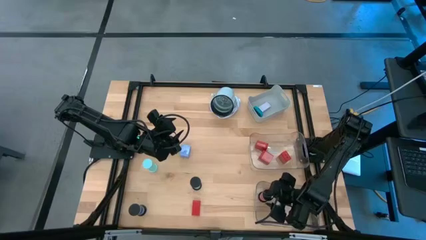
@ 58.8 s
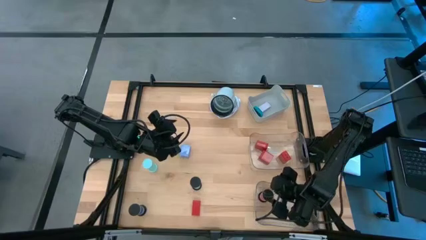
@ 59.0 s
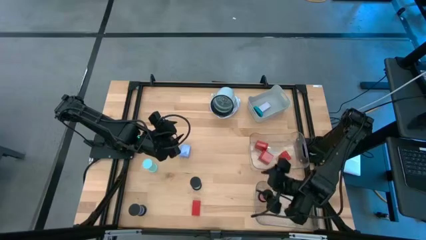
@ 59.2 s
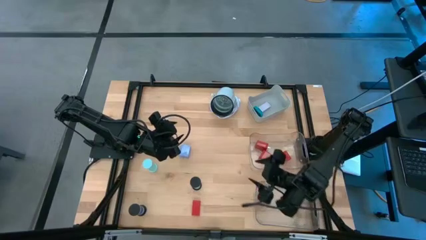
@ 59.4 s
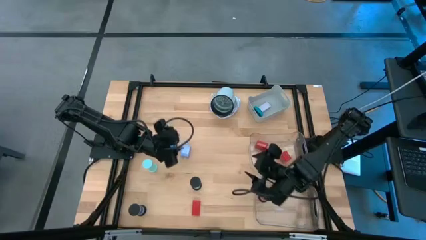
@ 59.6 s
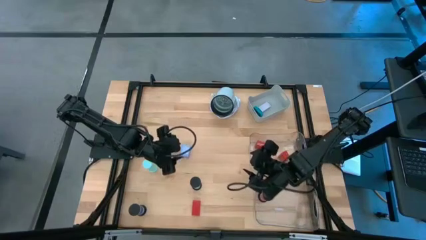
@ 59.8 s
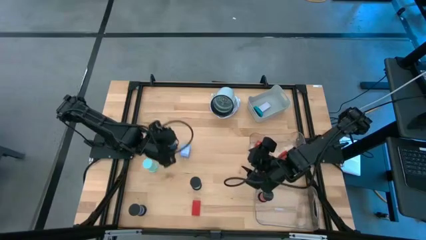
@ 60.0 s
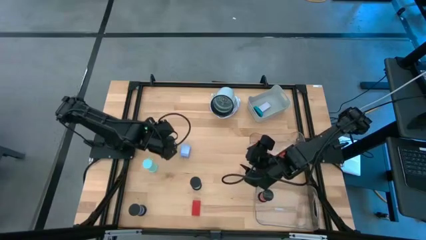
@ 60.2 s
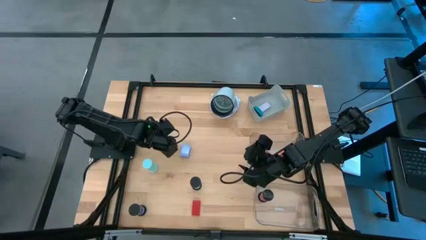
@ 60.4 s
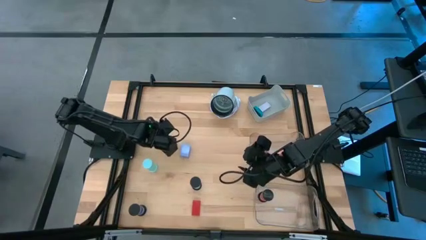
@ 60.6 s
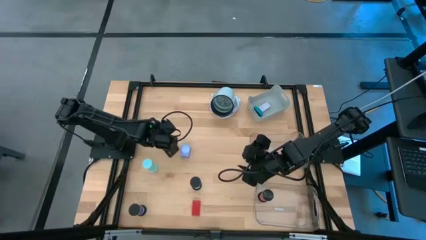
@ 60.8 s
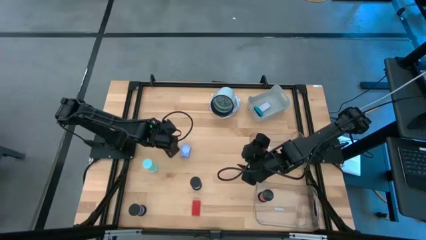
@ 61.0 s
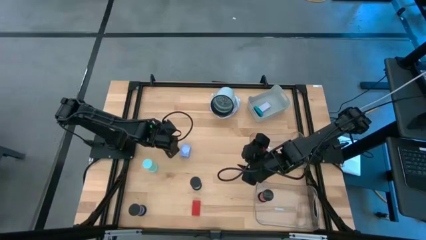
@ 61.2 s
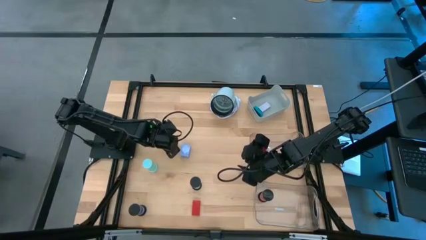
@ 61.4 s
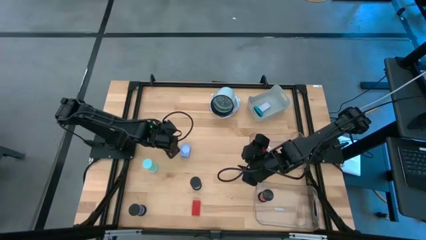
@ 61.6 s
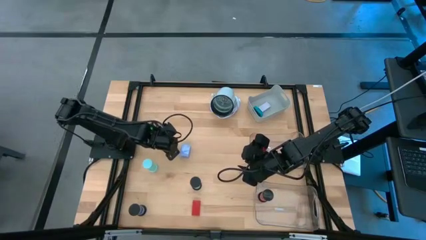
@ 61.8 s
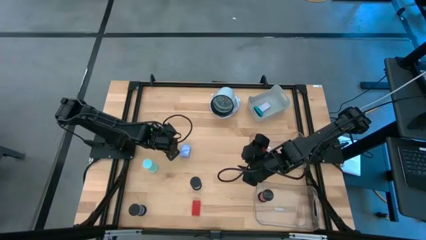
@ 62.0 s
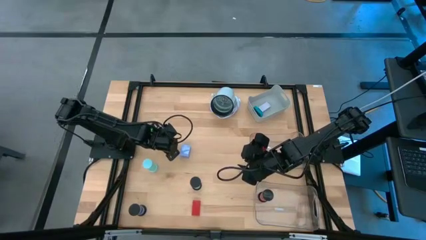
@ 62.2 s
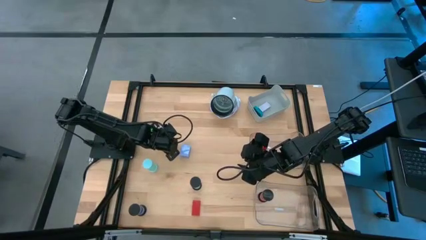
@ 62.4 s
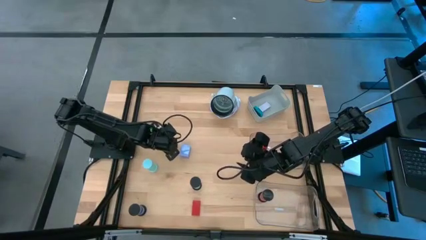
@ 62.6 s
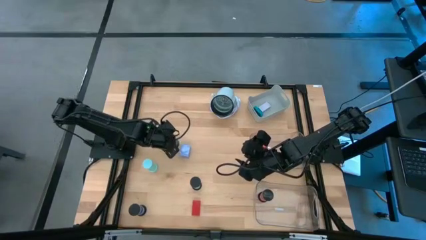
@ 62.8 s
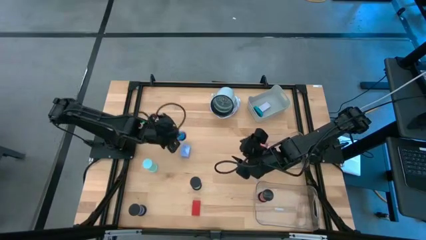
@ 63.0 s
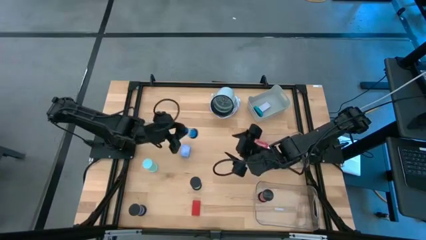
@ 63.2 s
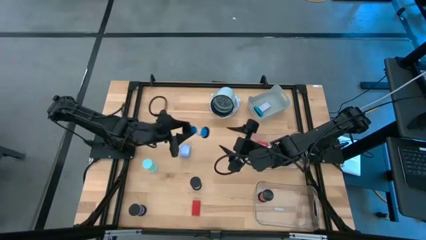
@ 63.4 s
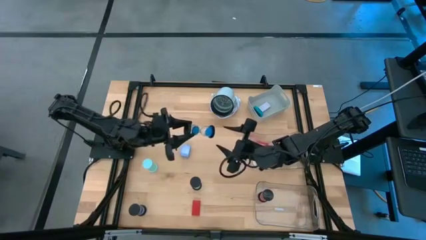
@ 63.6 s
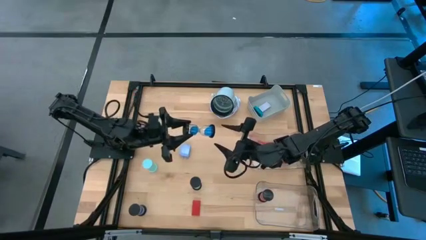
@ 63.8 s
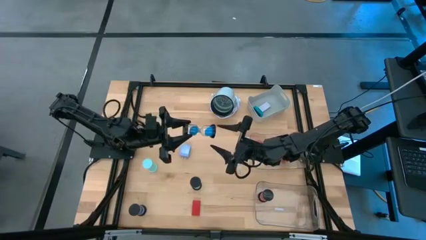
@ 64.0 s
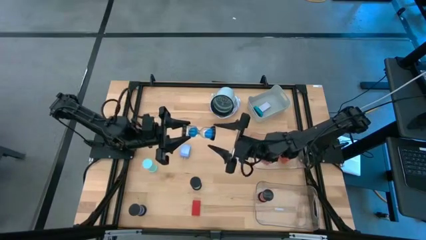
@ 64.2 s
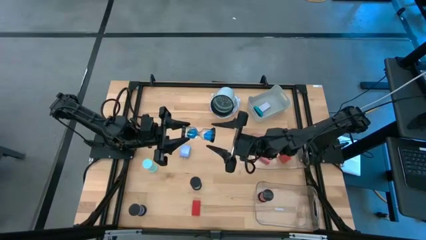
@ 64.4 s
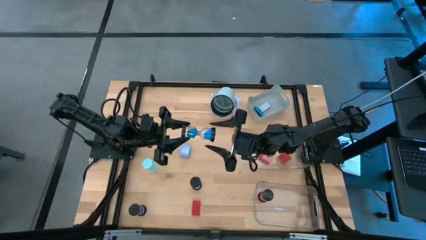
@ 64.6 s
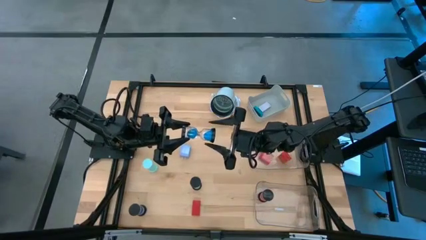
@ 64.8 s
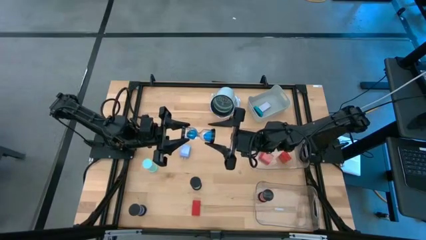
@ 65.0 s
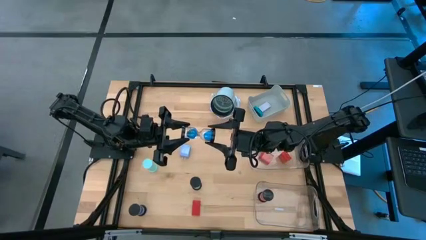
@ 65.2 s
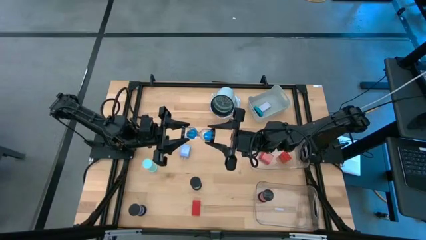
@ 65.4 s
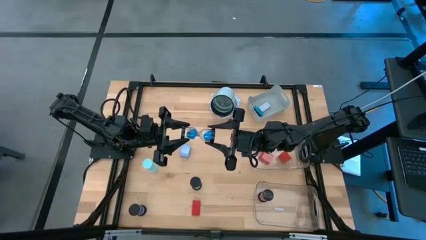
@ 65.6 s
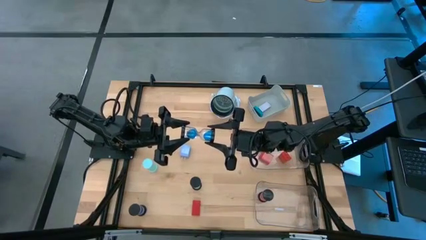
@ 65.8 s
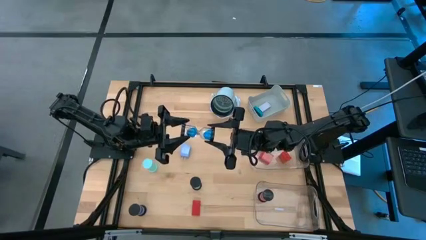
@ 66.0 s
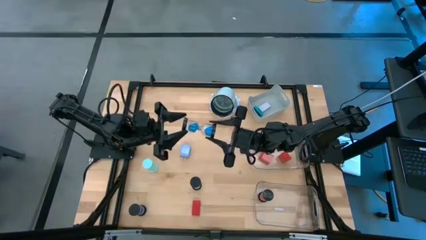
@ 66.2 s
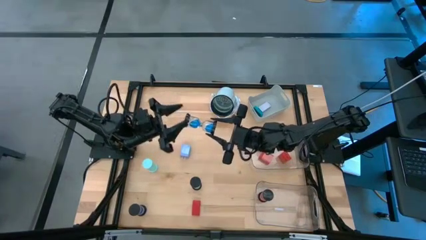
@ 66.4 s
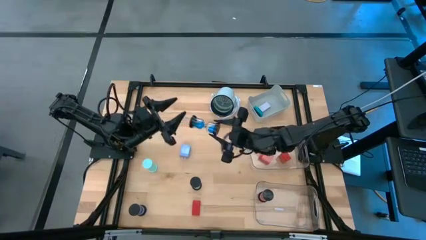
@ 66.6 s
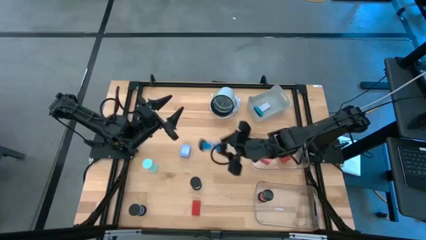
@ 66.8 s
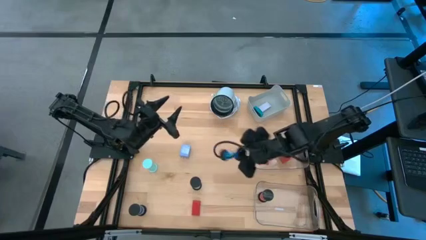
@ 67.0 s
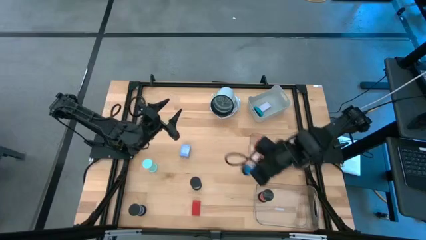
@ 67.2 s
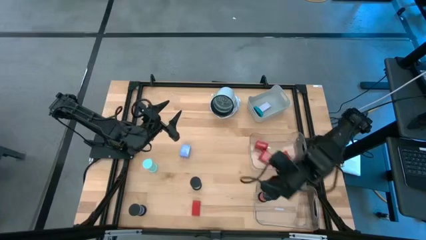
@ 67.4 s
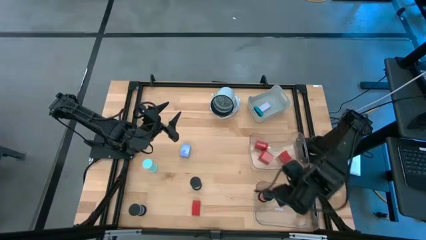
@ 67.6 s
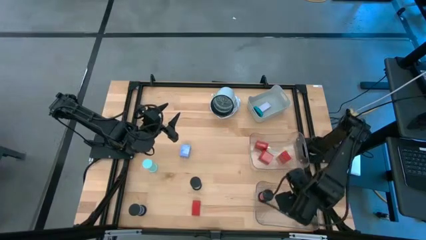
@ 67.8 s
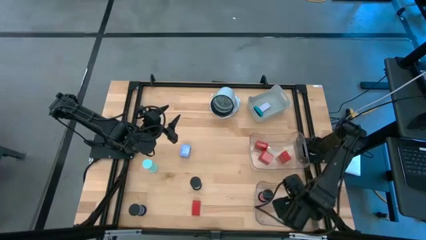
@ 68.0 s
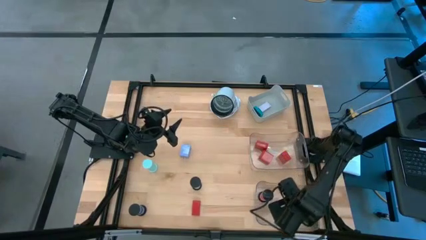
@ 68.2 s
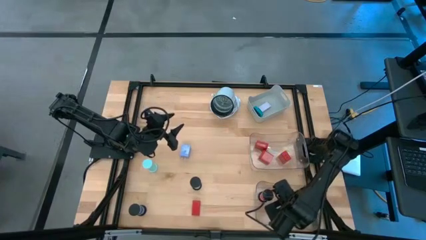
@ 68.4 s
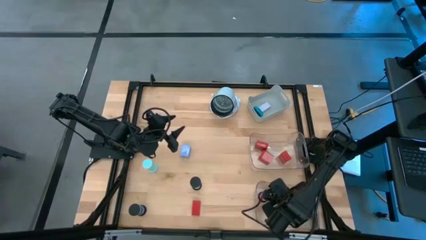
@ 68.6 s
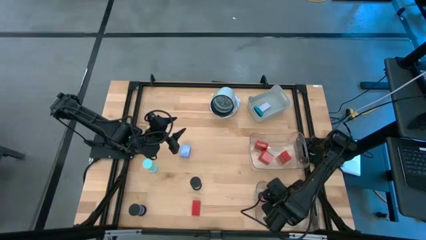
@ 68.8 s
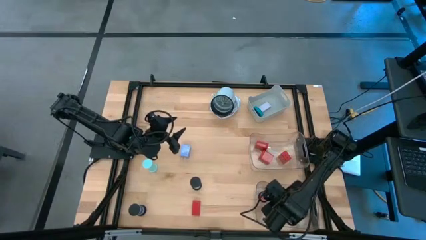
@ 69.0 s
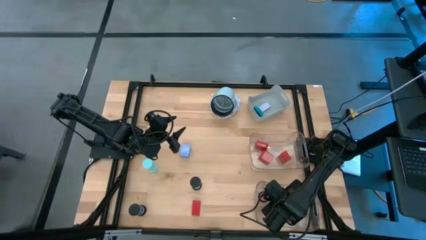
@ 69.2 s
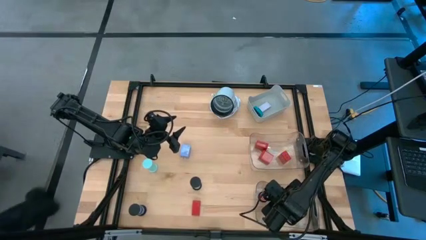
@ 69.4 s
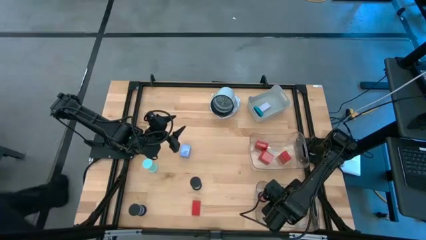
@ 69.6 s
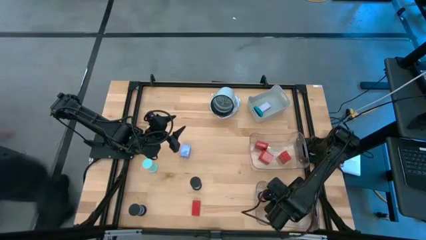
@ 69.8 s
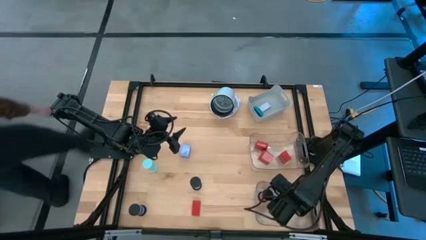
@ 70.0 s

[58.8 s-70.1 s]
Task: Pick & Place Office items
Put the top blue hourglass into the bottom transparent bin
